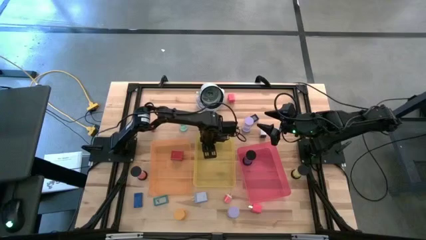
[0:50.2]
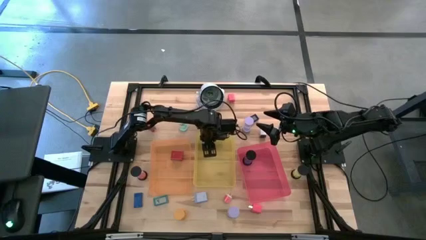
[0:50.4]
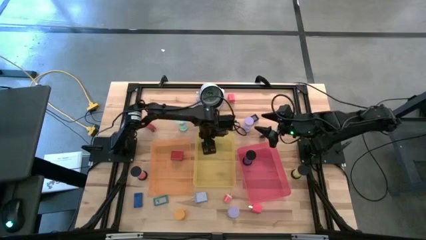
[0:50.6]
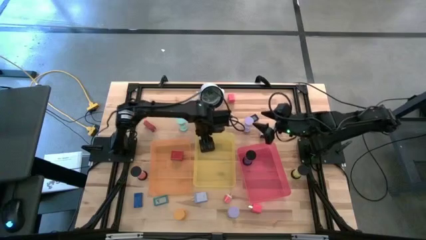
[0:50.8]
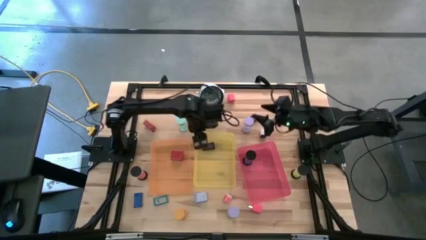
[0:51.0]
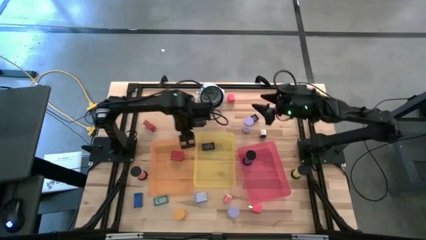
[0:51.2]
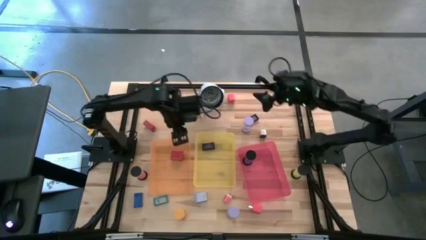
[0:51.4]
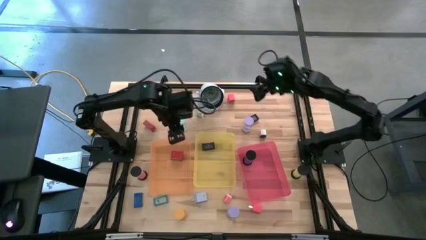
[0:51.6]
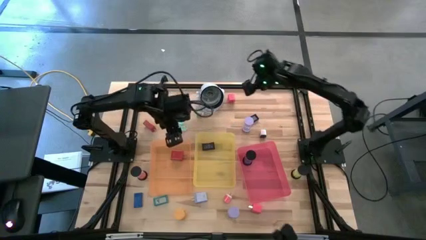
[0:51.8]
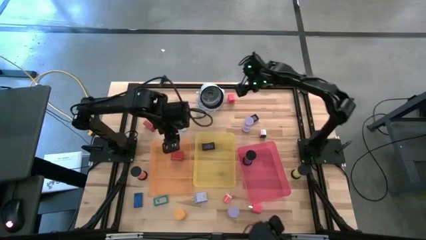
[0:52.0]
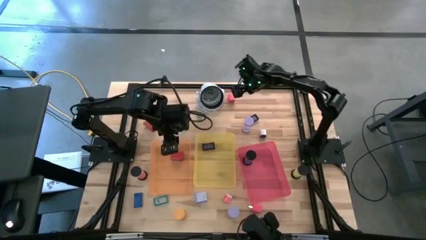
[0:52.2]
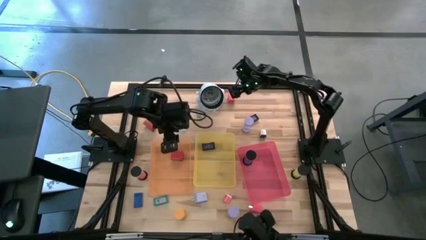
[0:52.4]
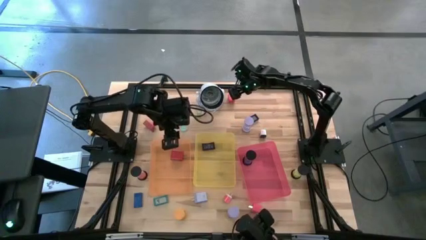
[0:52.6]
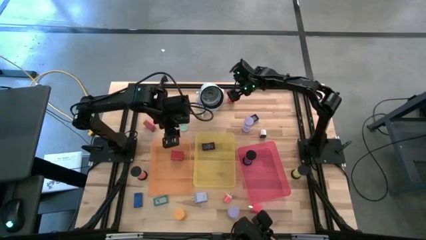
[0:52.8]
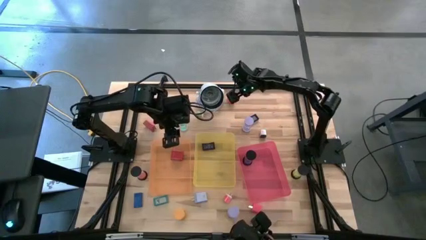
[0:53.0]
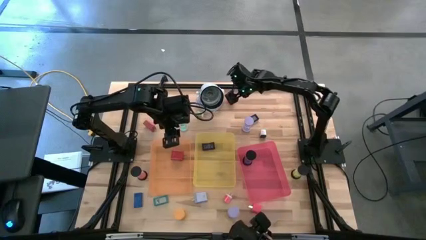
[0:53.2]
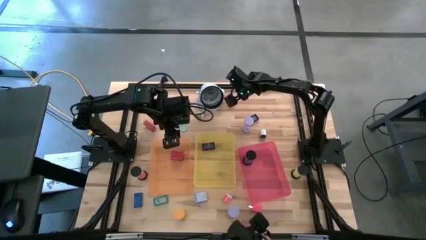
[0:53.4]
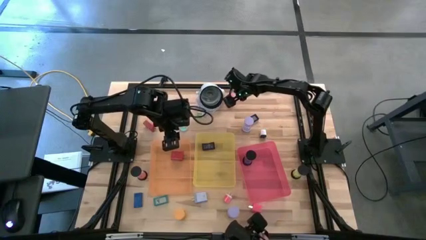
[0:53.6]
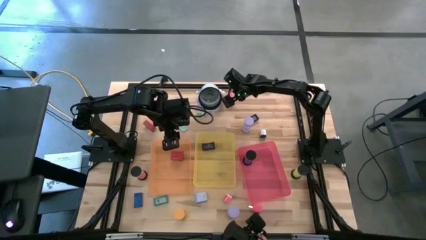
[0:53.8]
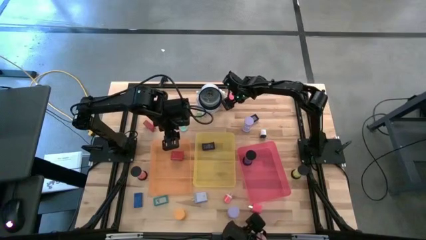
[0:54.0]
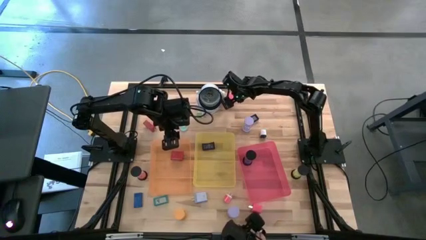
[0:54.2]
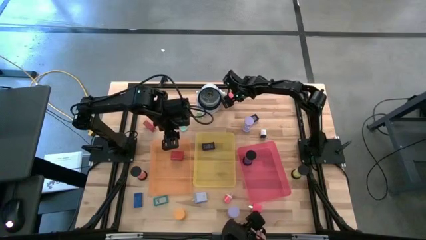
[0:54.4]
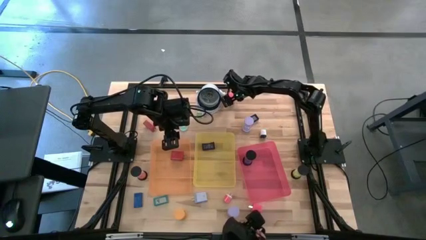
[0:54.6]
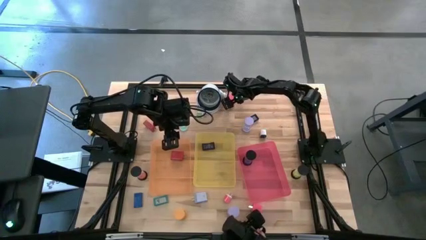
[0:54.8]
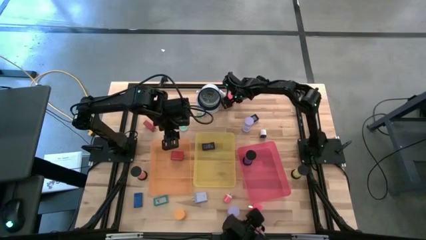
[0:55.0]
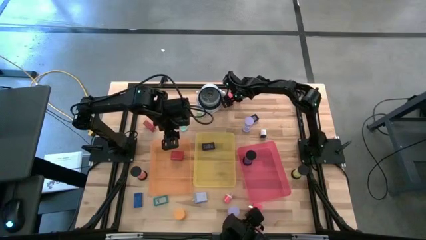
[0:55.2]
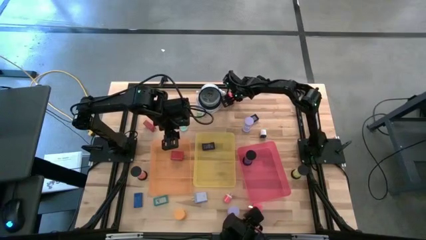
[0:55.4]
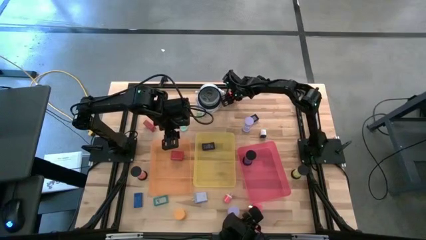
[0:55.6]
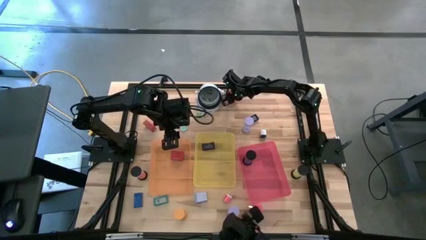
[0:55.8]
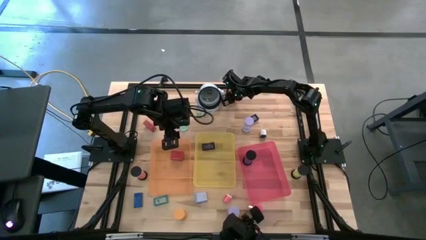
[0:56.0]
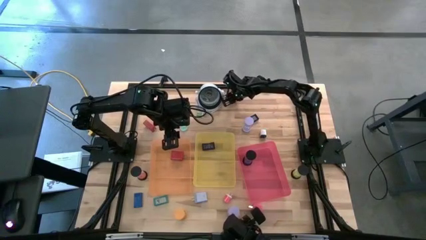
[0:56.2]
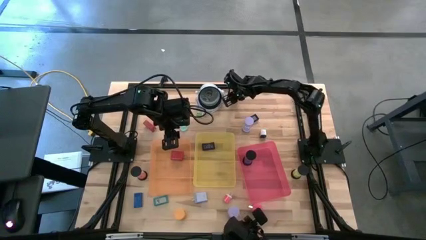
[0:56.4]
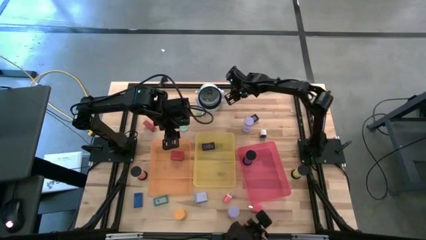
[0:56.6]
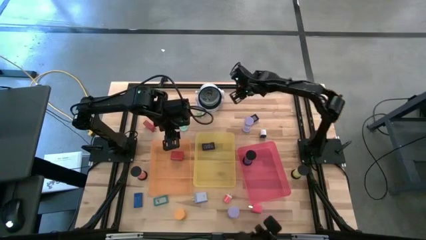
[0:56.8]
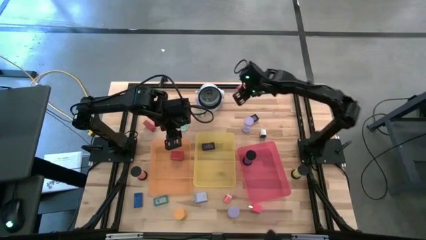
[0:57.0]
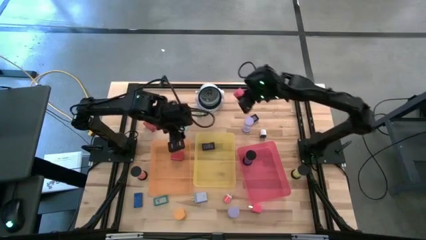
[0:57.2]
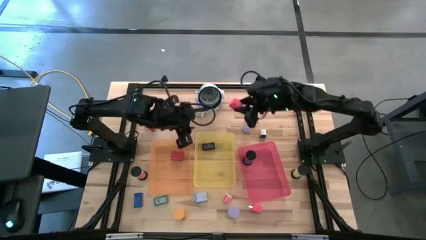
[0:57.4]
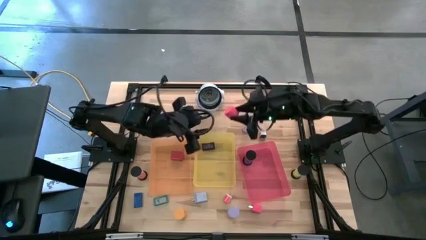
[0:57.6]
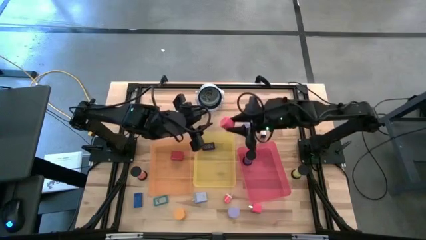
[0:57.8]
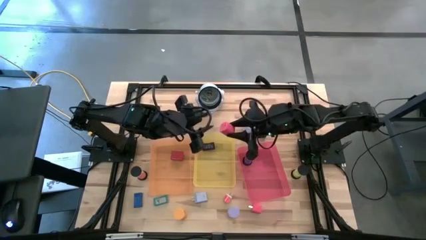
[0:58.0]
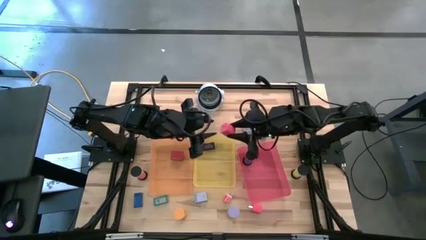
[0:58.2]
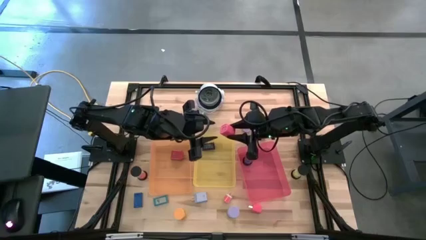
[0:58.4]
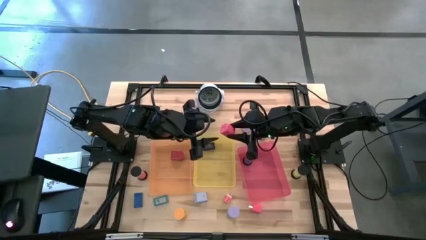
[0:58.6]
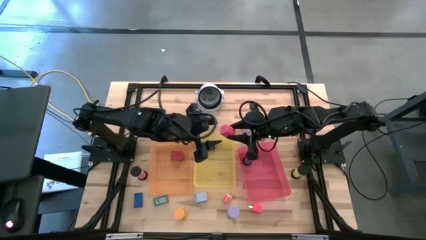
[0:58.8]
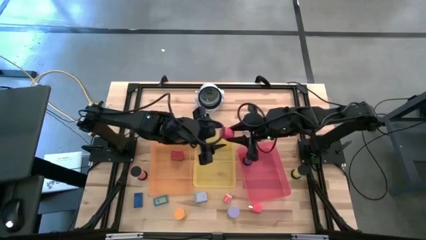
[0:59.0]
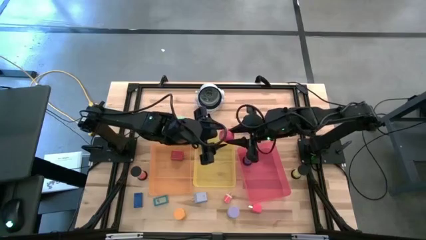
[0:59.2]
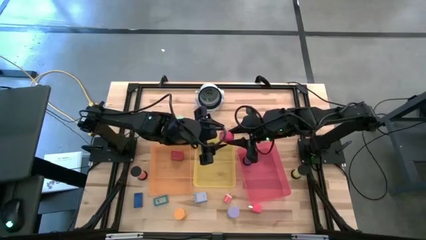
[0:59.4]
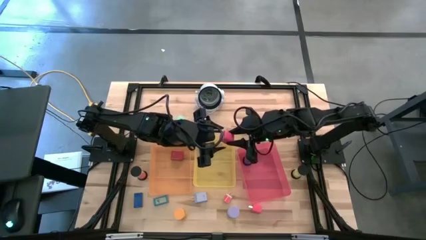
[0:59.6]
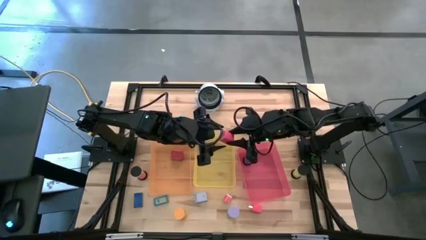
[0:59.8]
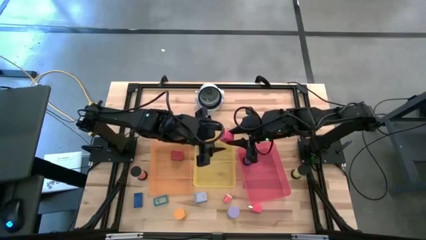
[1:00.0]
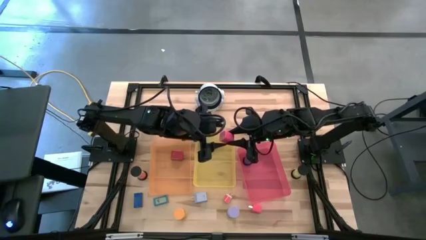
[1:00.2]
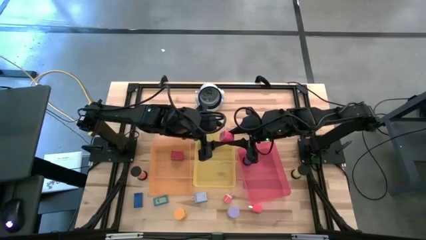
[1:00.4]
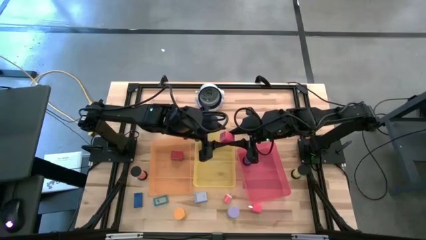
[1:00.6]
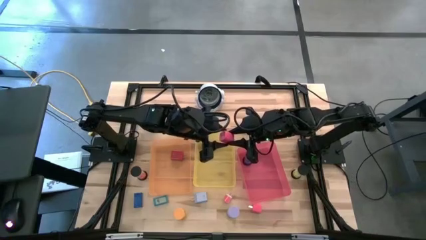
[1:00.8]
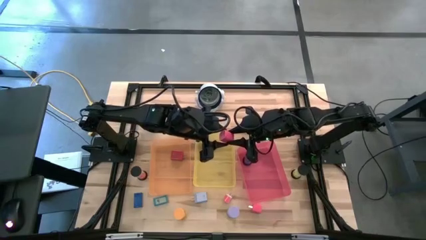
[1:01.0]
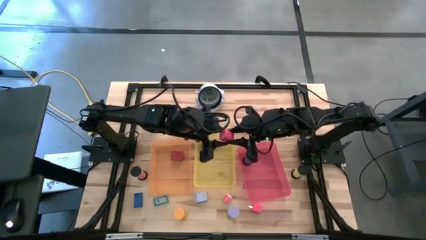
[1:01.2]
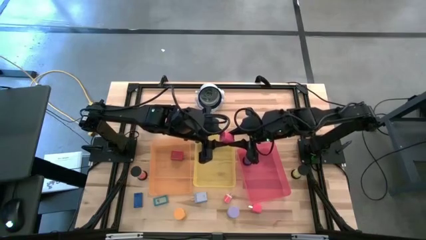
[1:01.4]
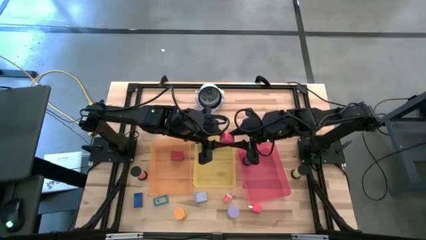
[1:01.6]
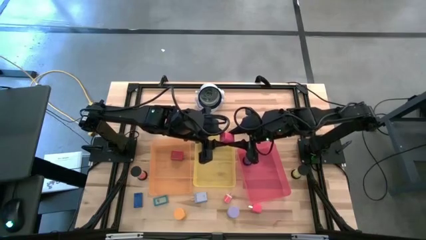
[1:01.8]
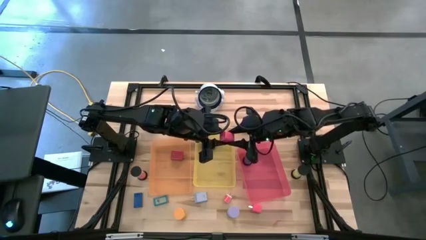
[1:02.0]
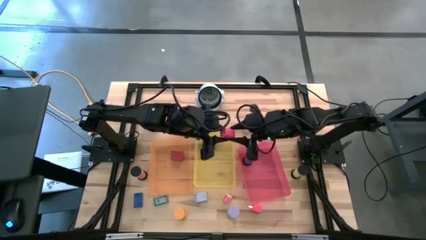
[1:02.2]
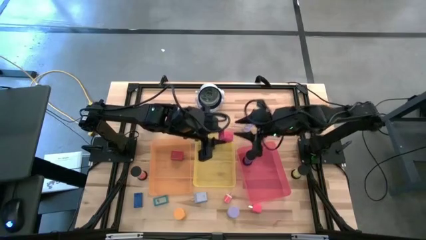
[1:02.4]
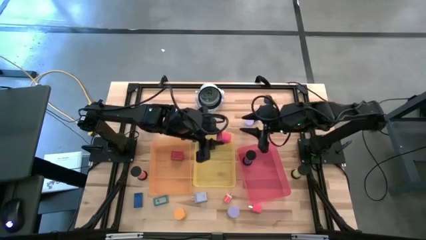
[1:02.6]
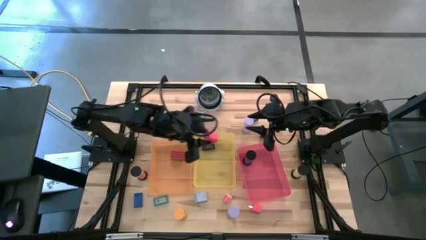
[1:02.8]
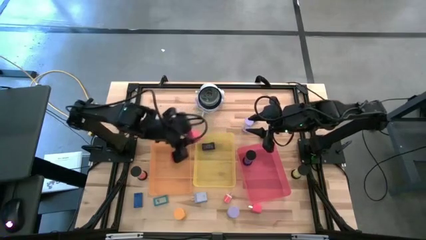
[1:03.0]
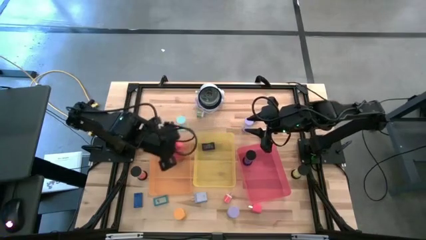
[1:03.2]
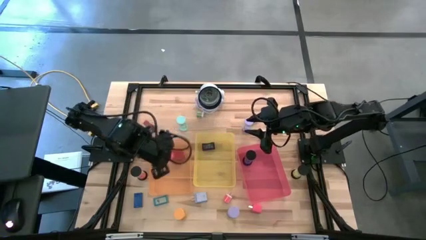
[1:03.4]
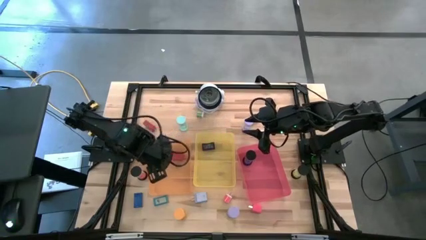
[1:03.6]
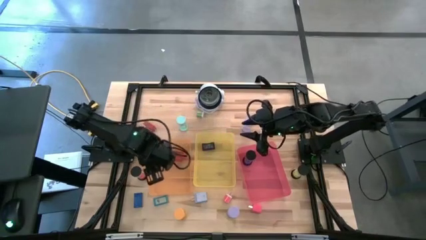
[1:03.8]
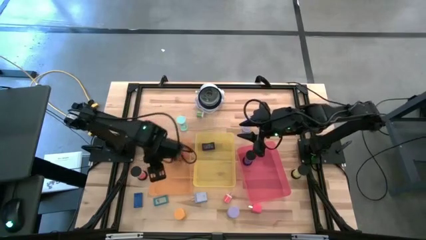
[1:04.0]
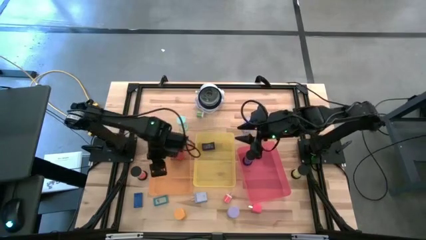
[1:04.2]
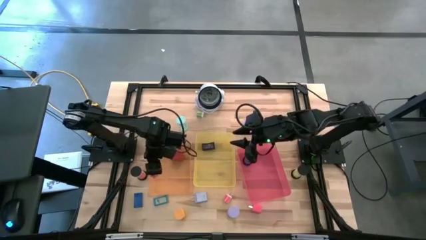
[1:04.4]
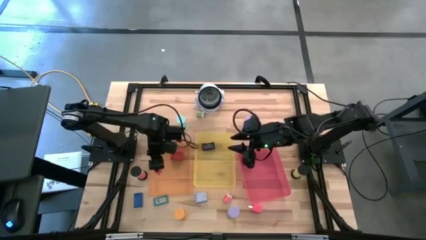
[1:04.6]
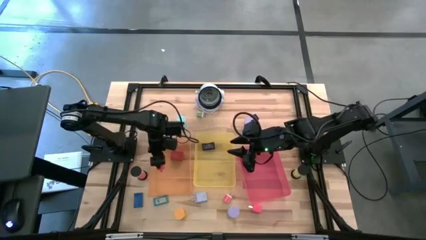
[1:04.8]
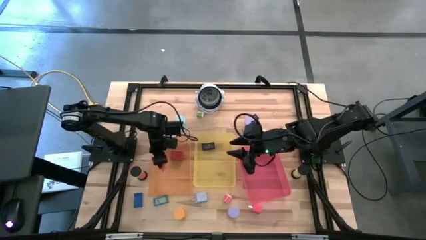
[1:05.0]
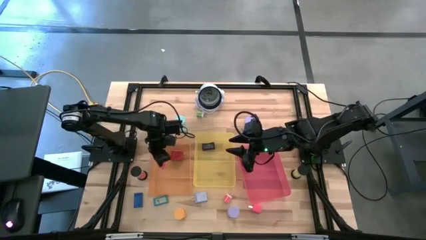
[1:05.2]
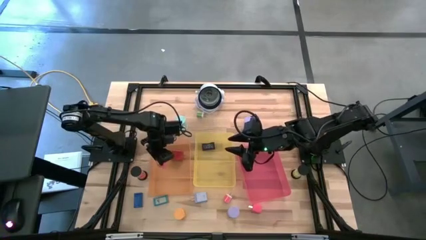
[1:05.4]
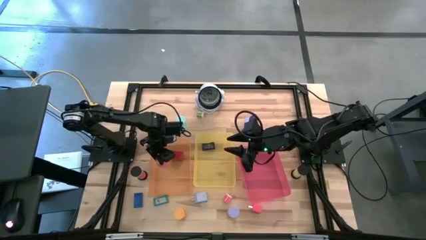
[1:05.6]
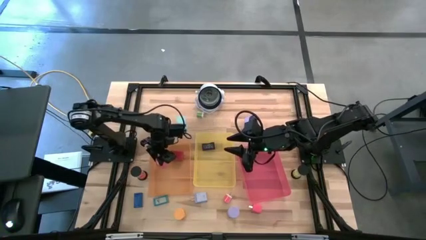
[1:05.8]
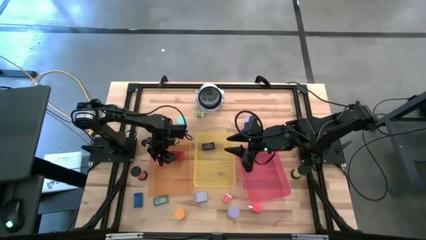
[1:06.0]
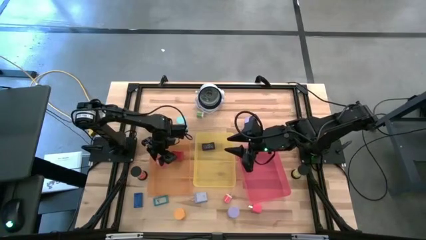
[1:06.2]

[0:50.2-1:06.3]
Task: Pick & Place Office items
Put the pink charger adaptor into the orange bin
